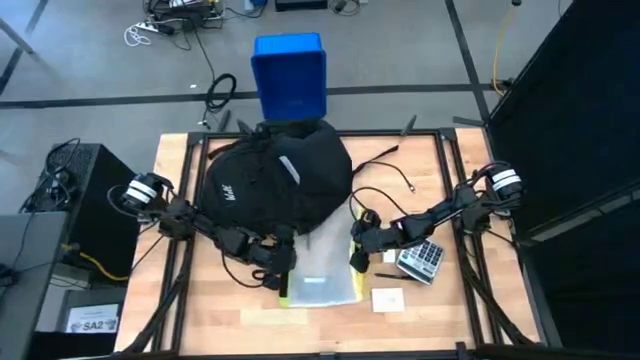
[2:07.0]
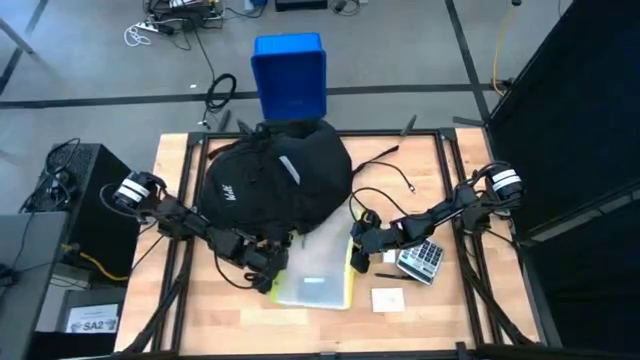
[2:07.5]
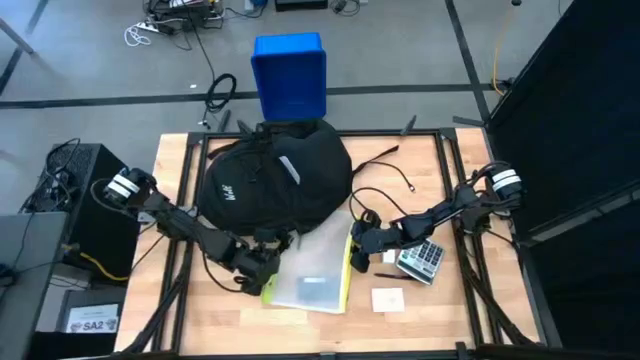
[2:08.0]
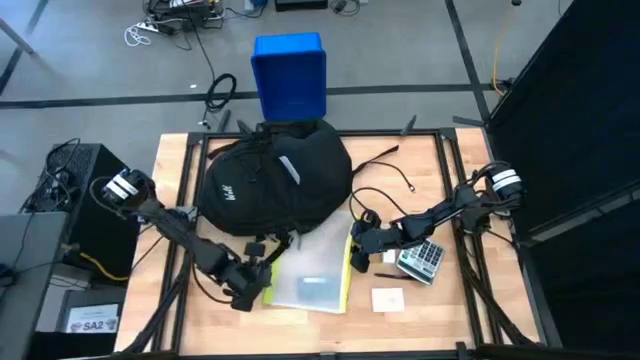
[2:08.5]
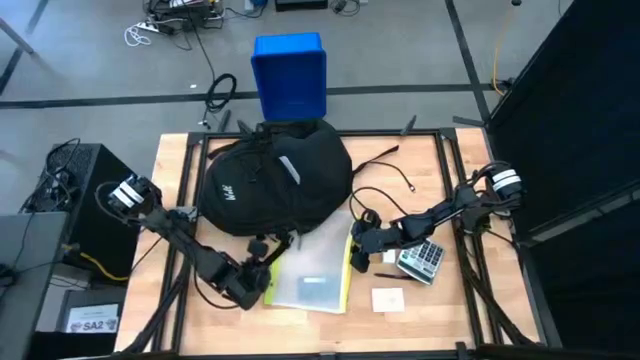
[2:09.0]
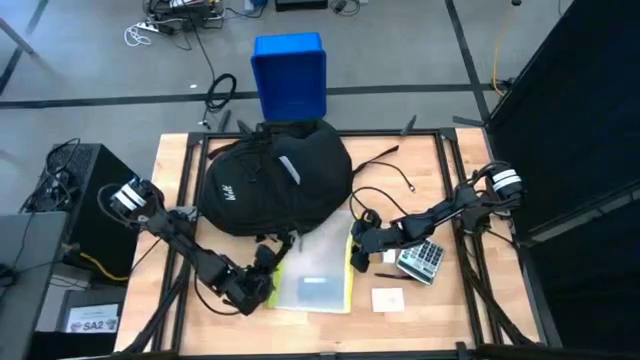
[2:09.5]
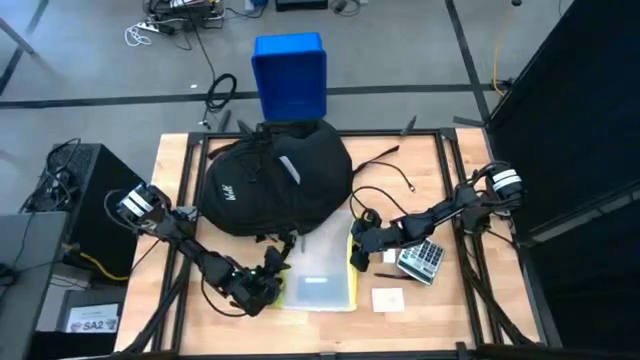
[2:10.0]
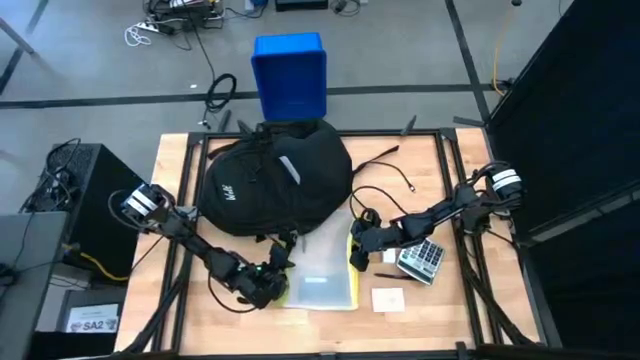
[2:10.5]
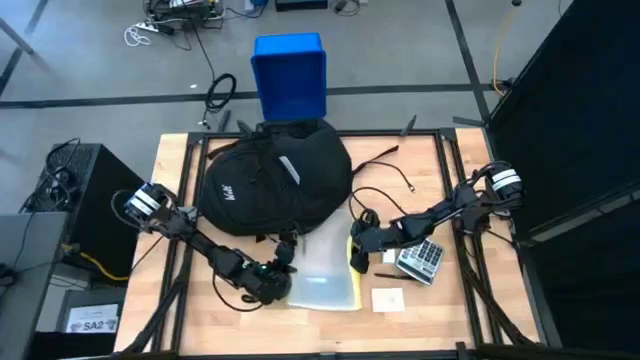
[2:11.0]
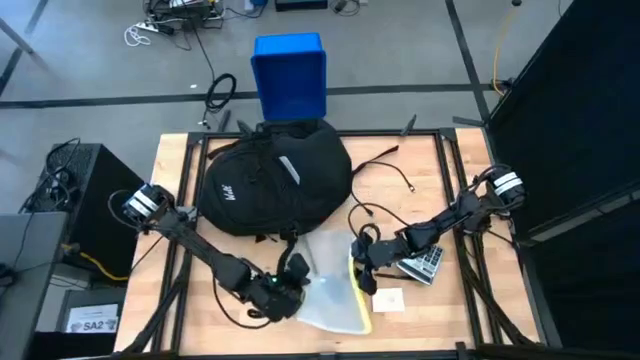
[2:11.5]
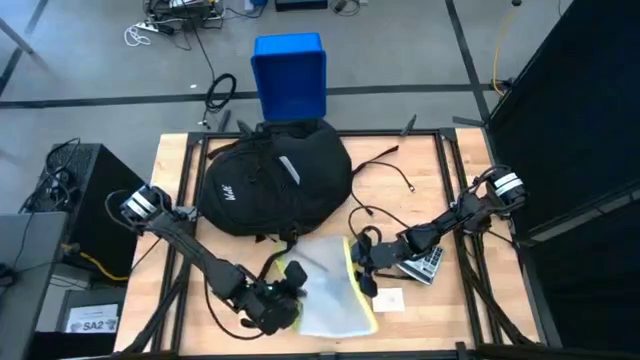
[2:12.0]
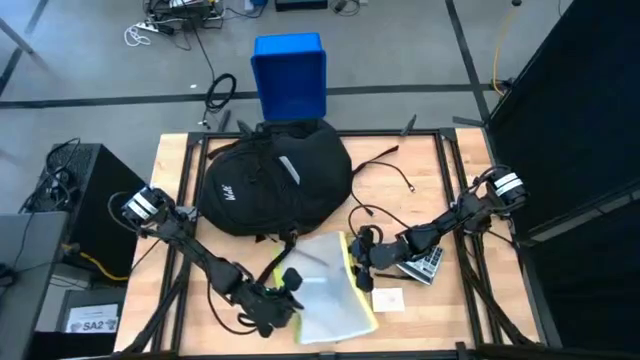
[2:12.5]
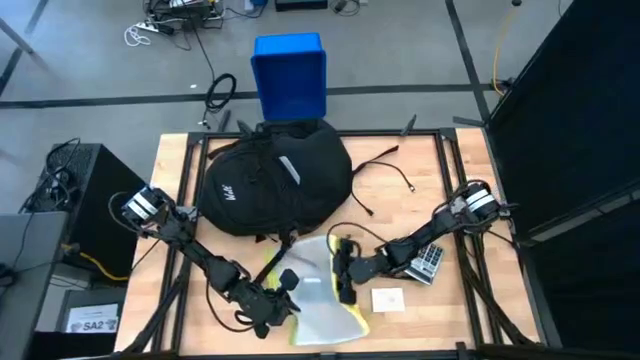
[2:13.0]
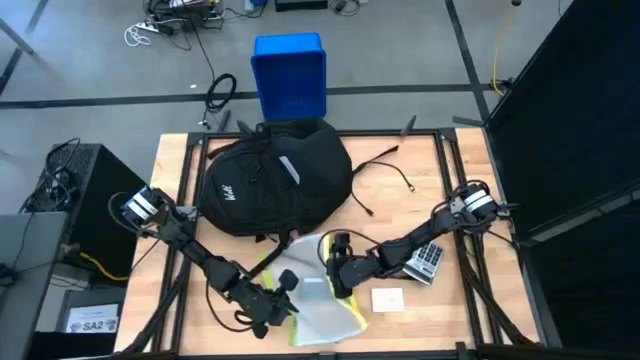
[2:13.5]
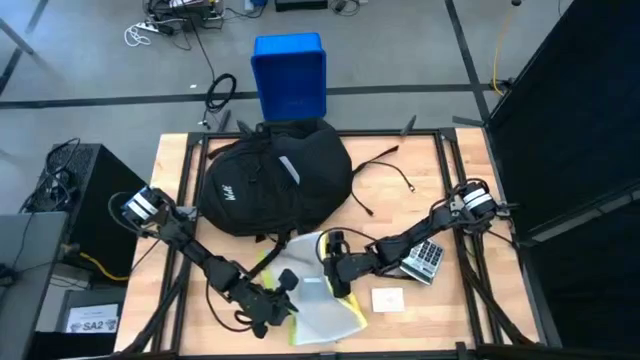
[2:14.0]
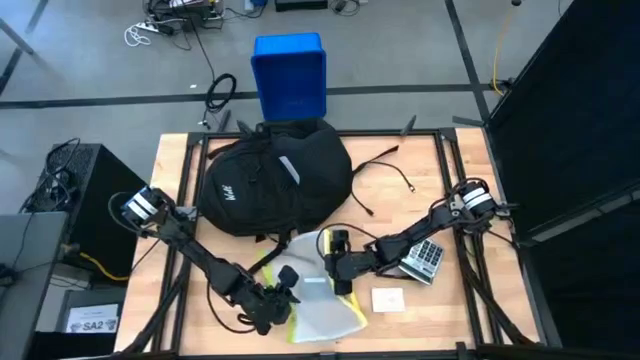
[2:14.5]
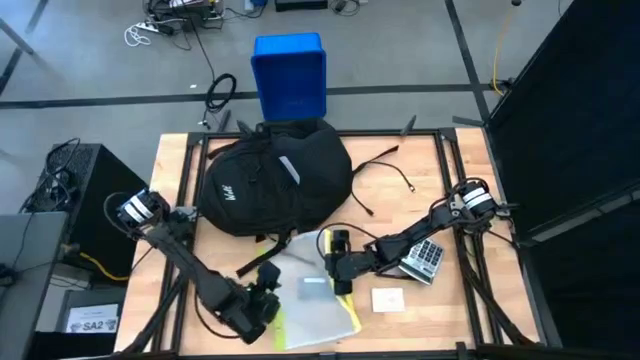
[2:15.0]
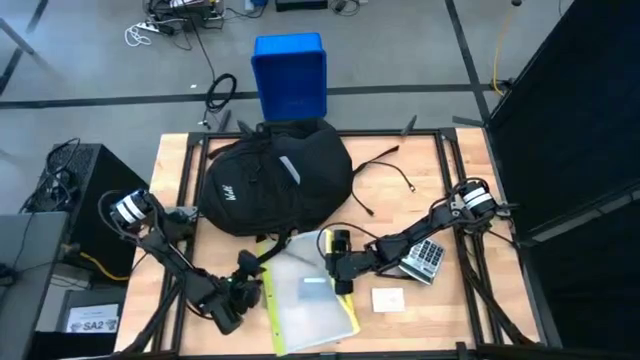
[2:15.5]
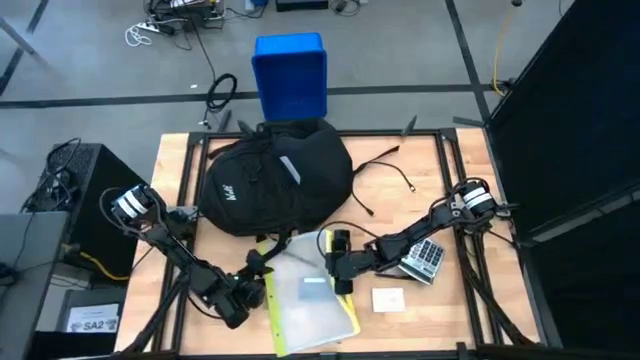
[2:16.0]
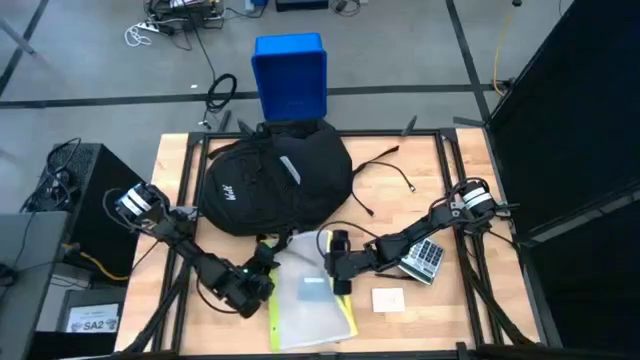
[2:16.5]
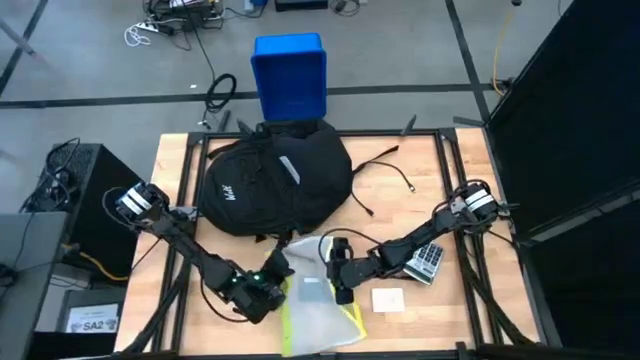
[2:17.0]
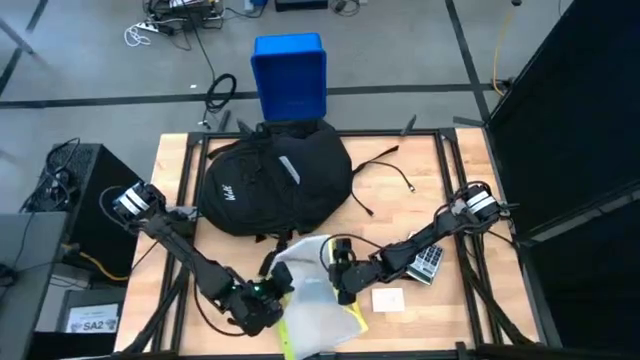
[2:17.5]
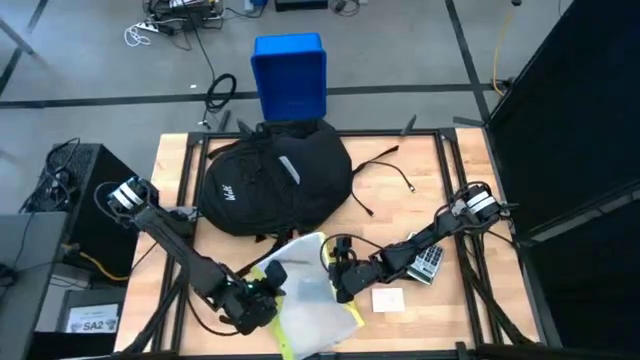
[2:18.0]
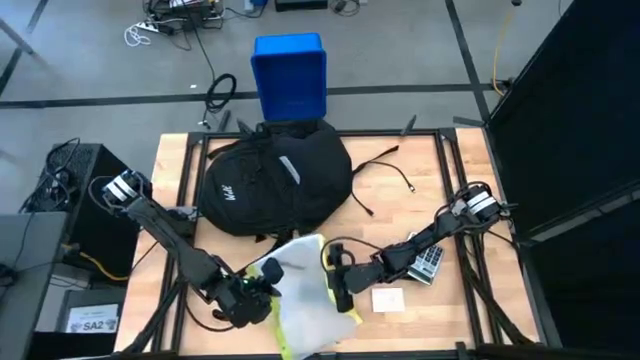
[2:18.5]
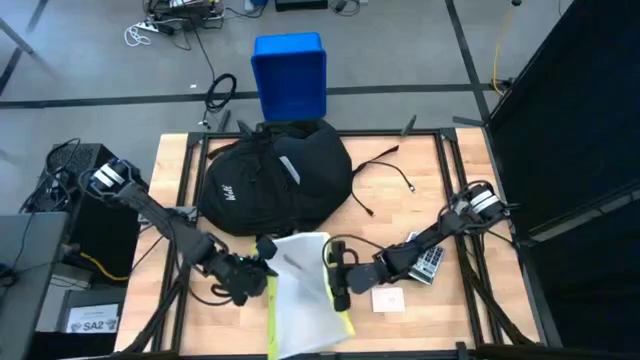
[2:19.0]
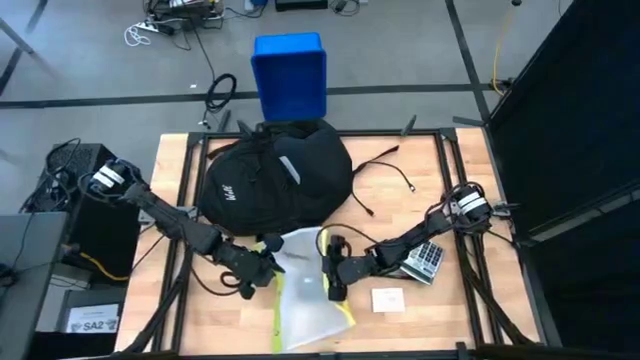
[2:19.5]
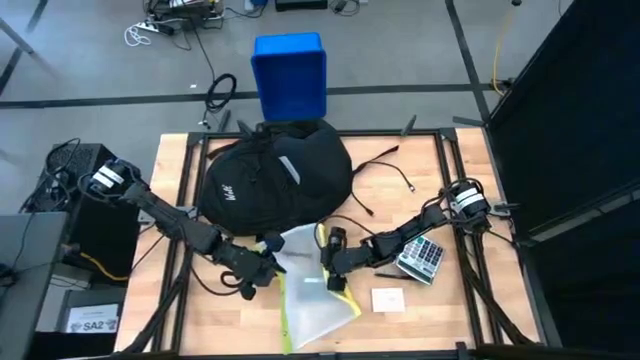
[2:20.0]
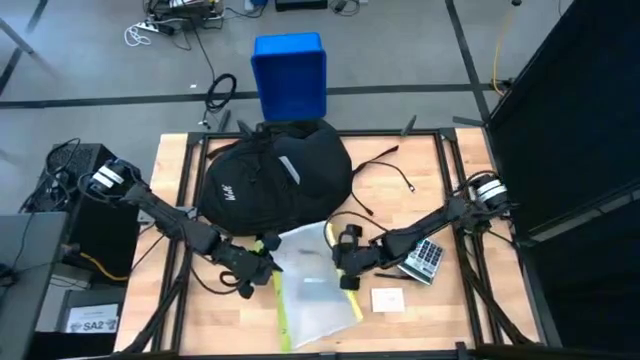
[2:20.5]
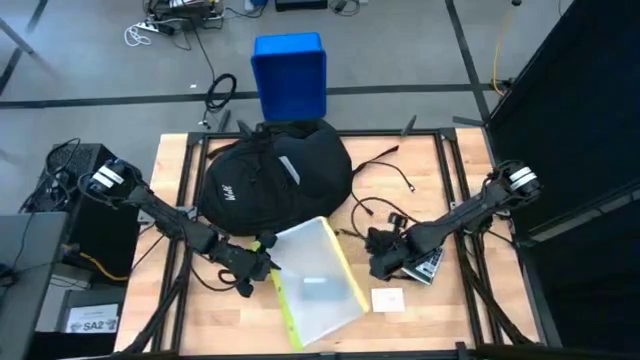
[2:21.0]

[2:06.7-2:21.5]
Task: Unpack backpack
Remove the pen from the zip bag

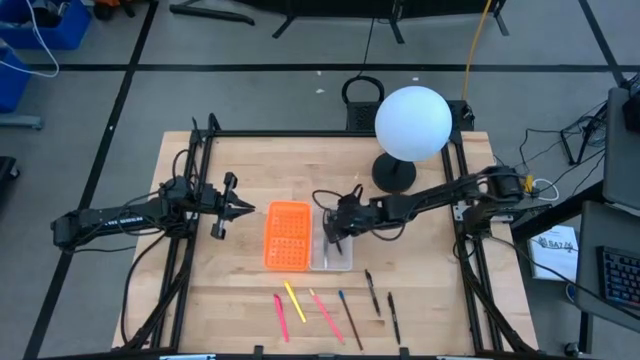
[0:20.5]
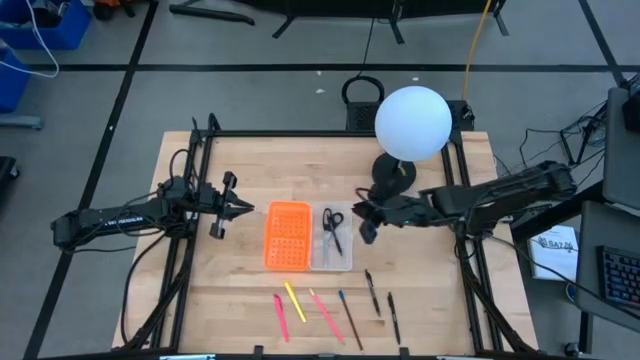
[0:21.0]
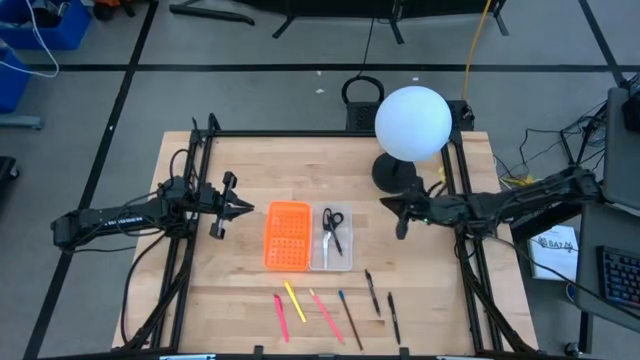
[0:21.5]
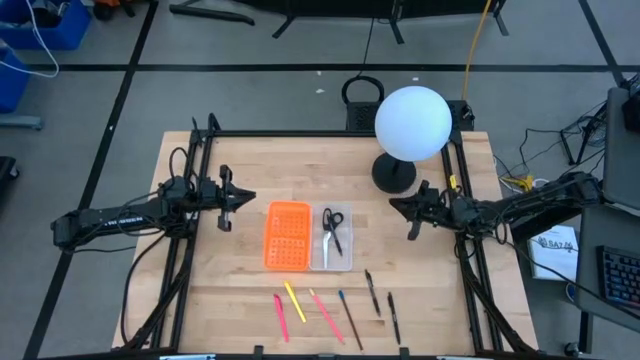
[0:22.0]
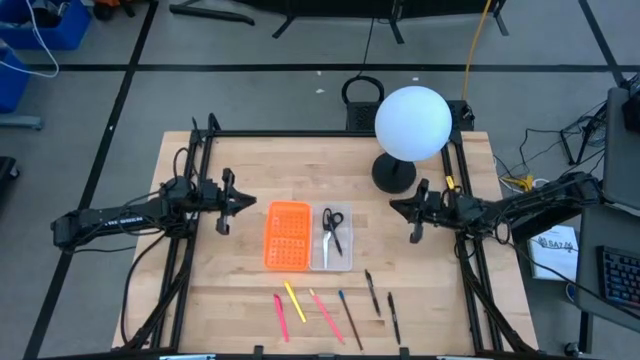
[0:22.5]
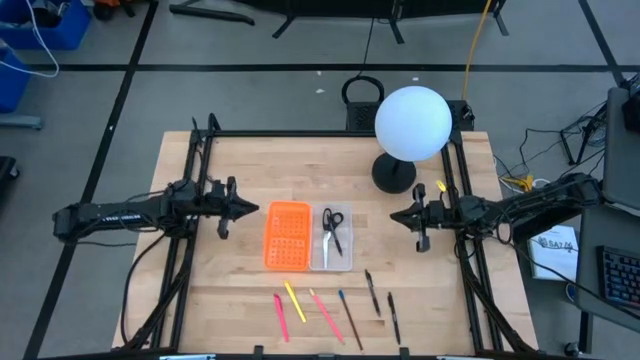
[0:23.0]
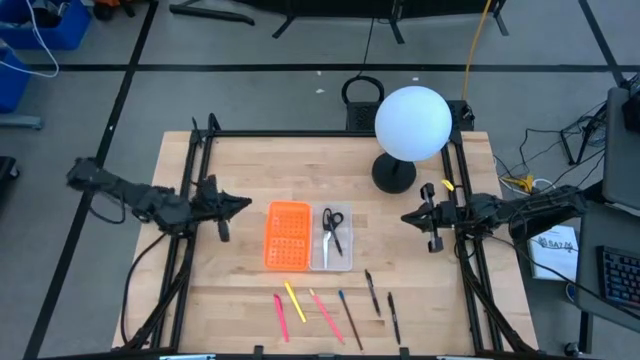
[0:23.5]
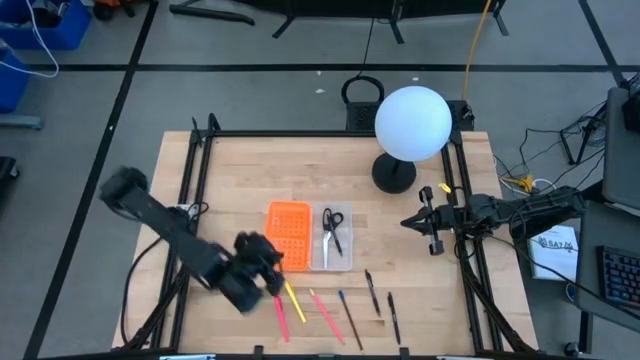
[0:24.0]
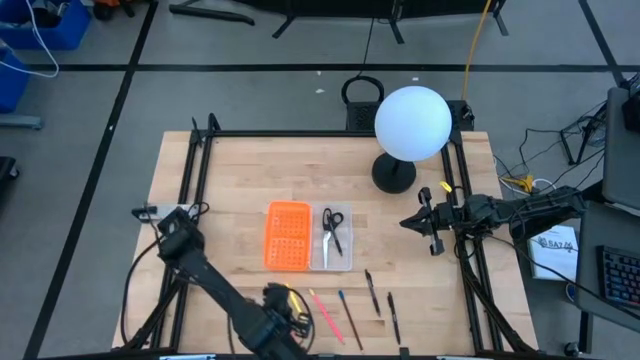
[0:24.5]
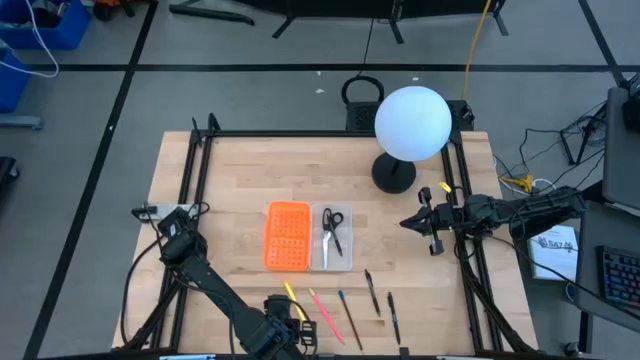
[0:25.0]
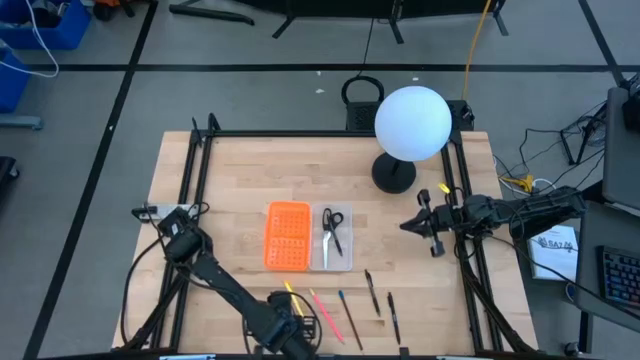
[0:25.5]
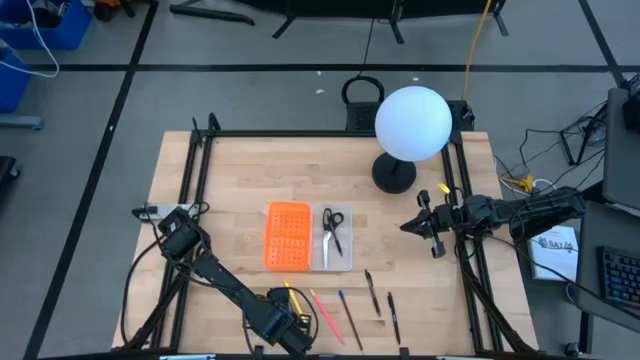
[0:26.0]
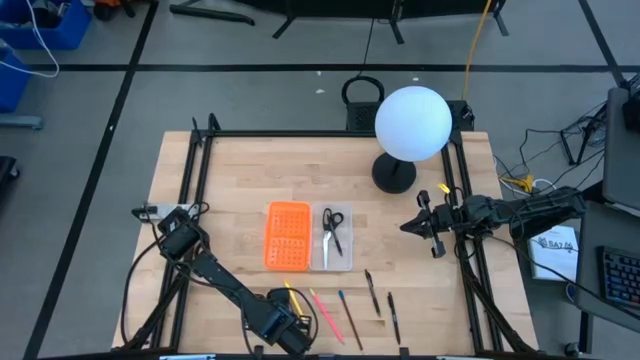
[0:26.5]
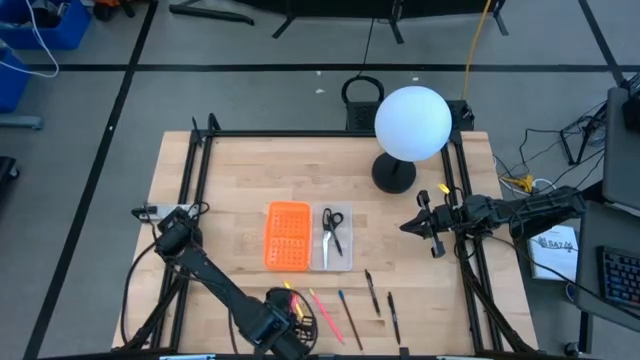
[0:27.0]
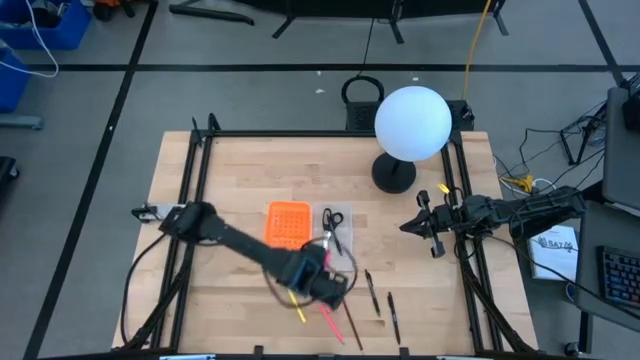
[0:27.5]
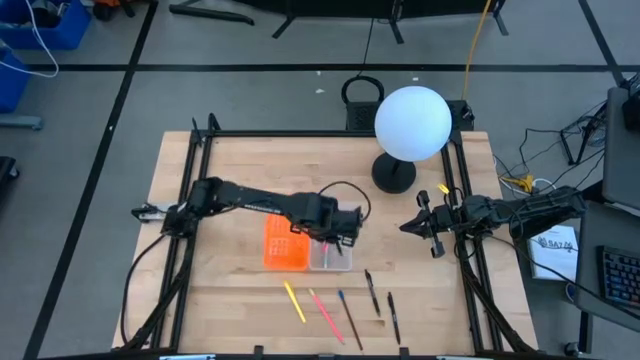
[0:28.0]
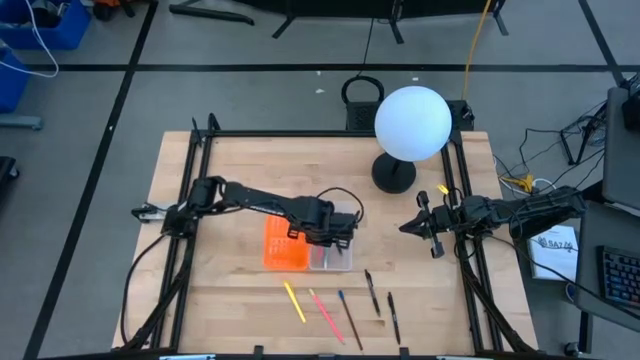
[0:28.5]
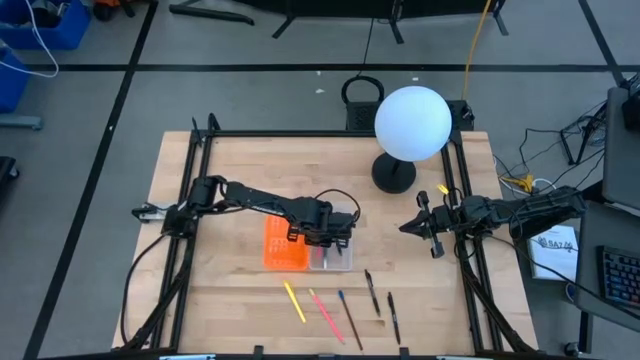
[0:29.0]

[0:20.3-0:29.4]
Task: Pick & place school supplies into a supply box
Put the pink pen into the orange supply box
